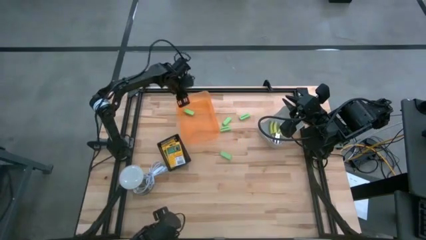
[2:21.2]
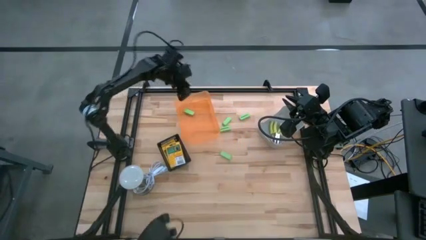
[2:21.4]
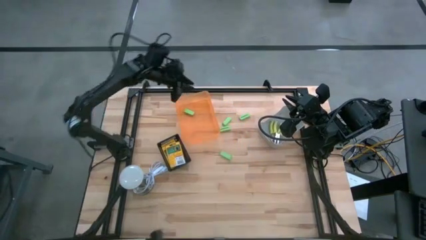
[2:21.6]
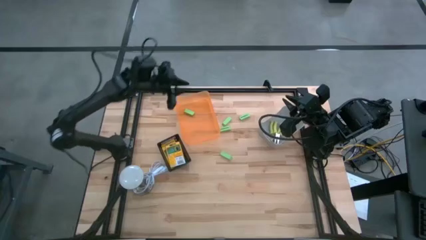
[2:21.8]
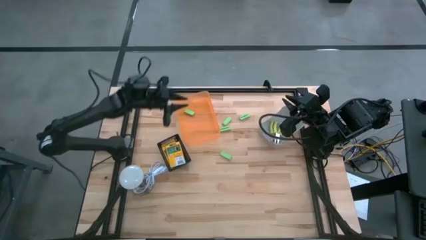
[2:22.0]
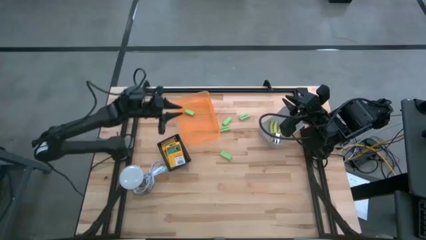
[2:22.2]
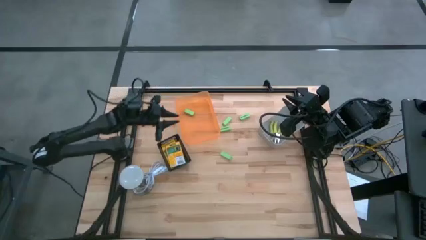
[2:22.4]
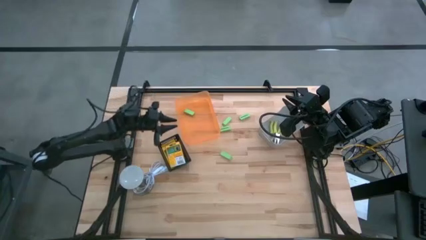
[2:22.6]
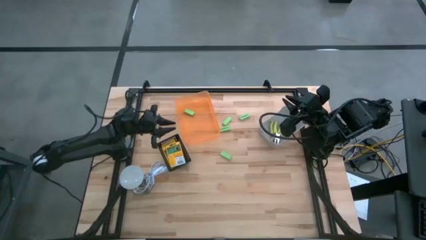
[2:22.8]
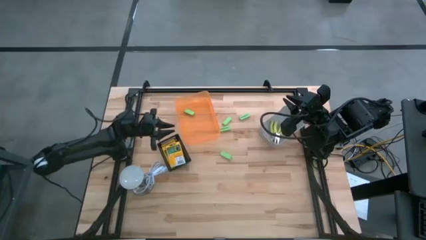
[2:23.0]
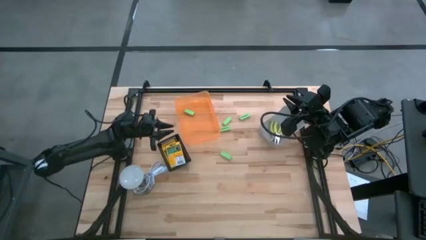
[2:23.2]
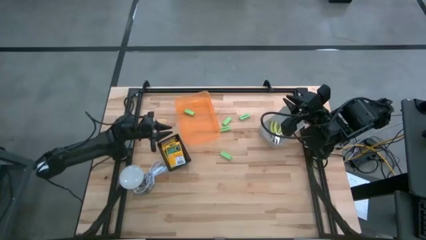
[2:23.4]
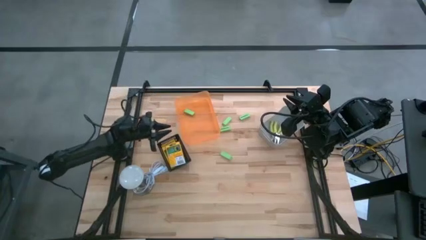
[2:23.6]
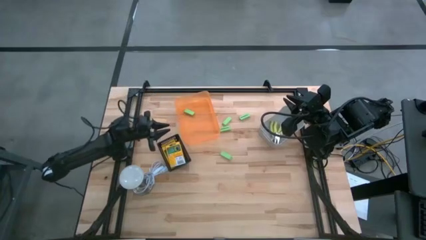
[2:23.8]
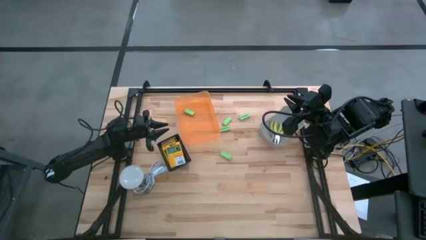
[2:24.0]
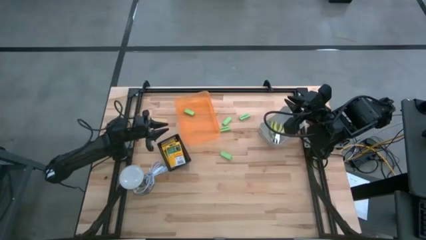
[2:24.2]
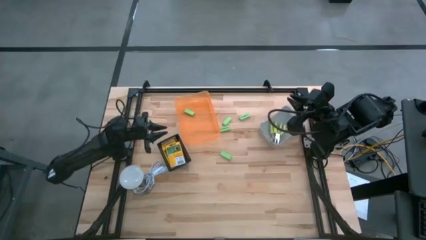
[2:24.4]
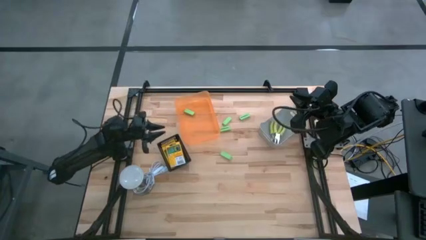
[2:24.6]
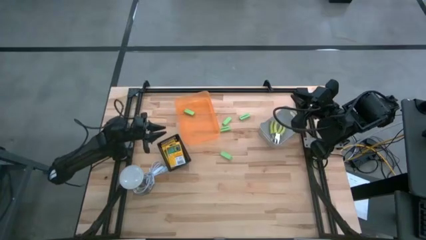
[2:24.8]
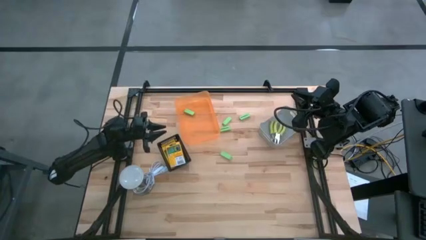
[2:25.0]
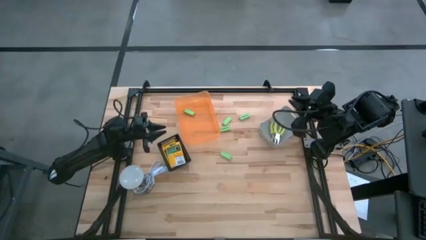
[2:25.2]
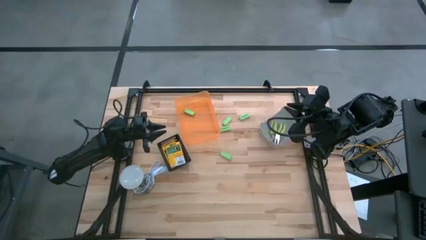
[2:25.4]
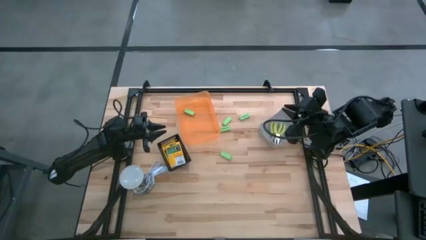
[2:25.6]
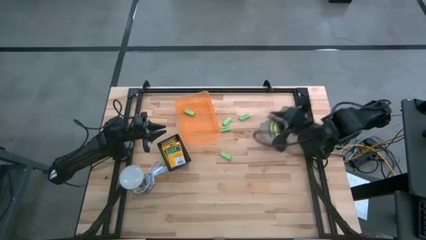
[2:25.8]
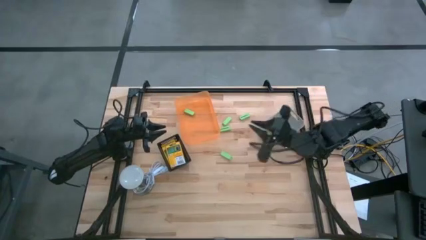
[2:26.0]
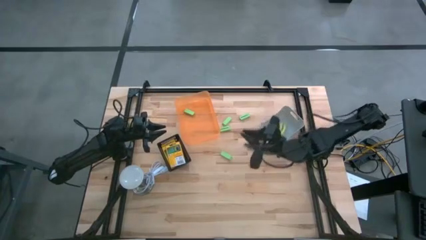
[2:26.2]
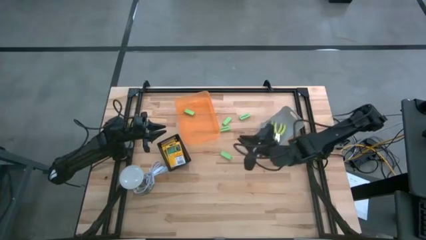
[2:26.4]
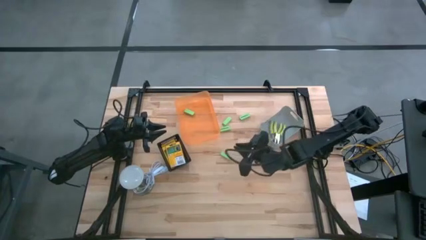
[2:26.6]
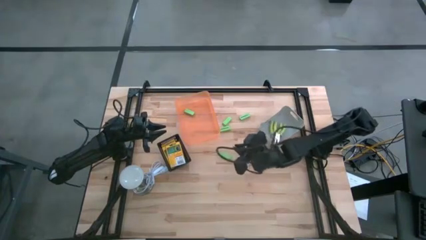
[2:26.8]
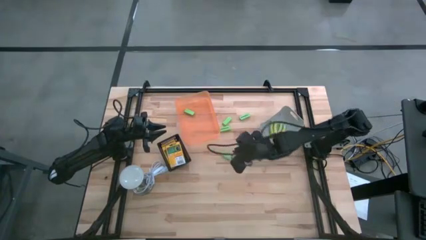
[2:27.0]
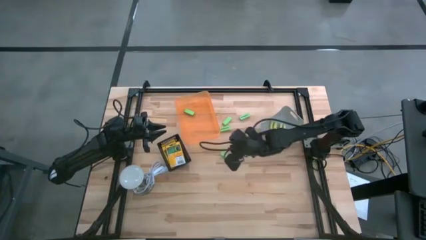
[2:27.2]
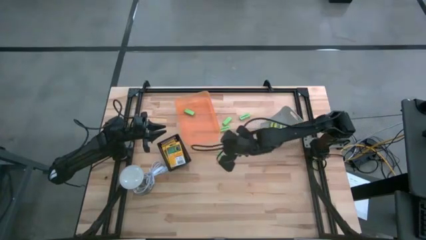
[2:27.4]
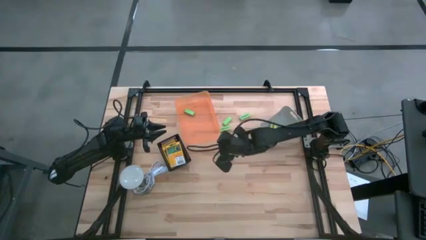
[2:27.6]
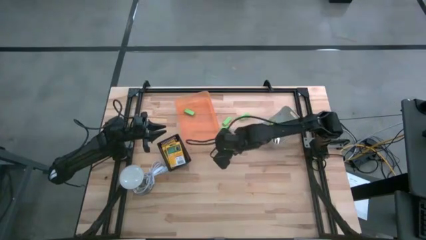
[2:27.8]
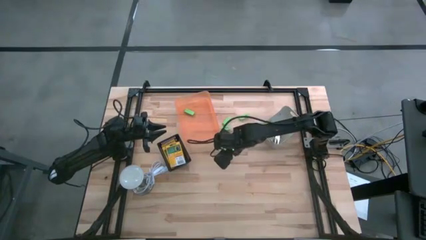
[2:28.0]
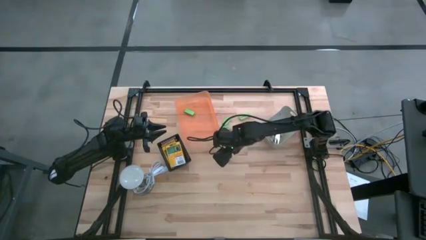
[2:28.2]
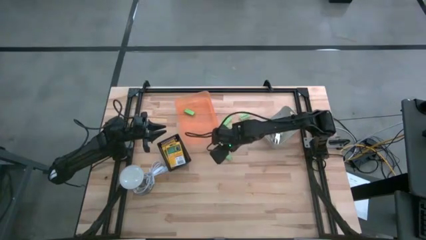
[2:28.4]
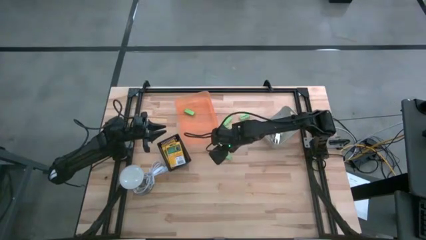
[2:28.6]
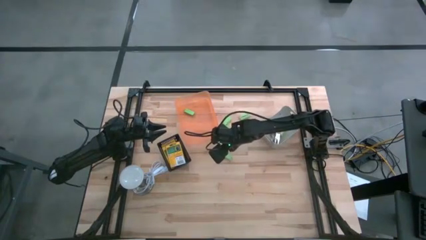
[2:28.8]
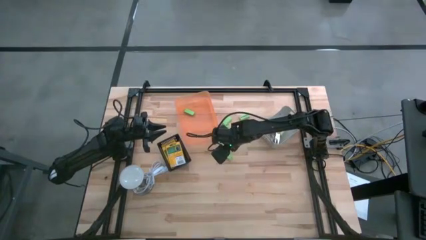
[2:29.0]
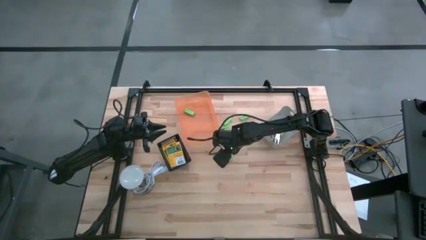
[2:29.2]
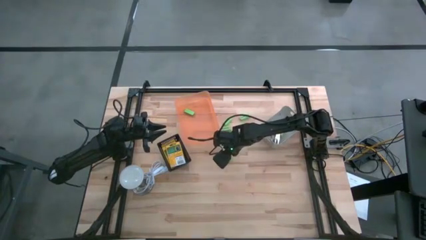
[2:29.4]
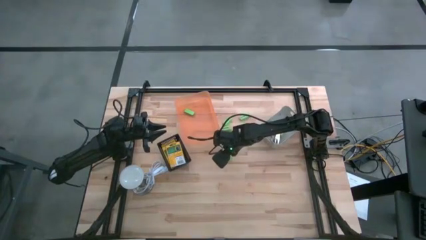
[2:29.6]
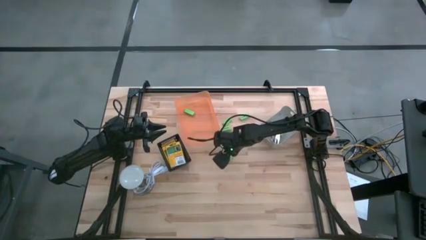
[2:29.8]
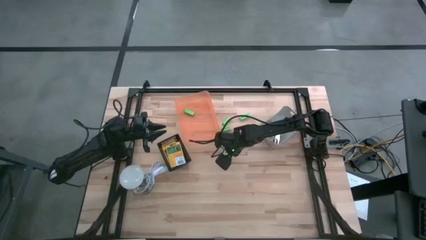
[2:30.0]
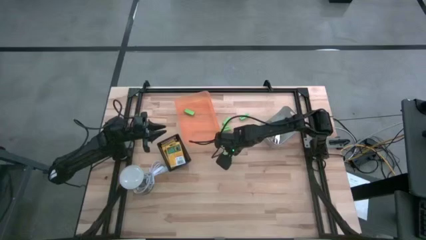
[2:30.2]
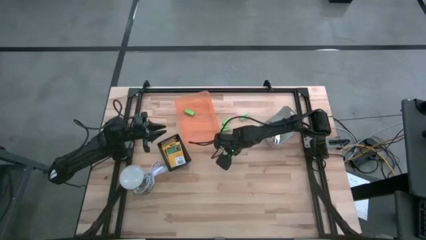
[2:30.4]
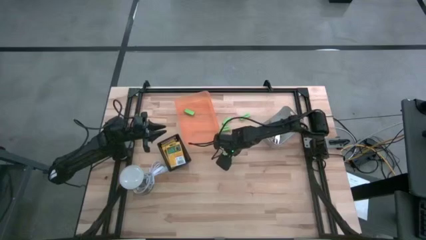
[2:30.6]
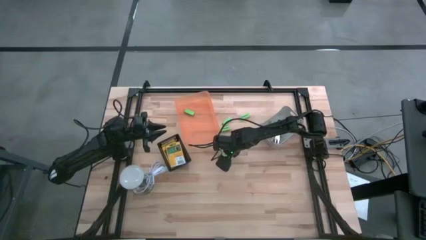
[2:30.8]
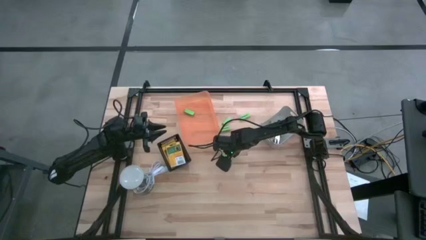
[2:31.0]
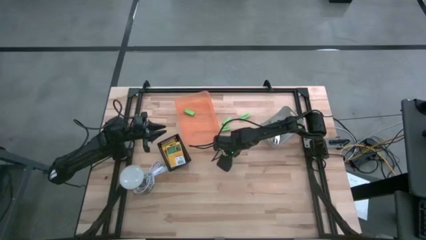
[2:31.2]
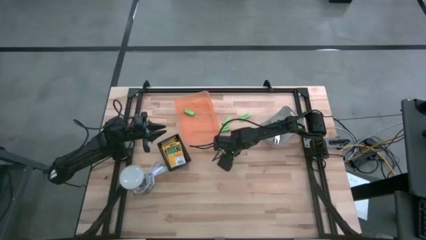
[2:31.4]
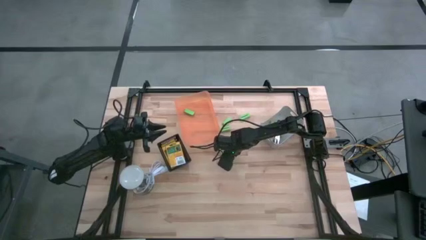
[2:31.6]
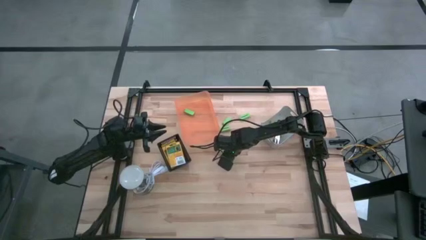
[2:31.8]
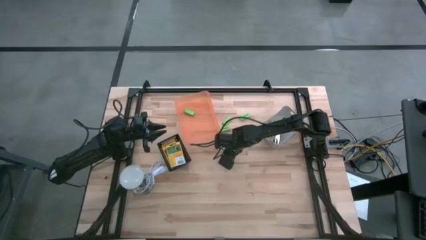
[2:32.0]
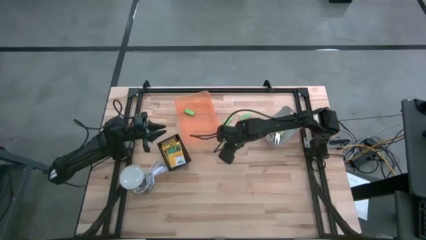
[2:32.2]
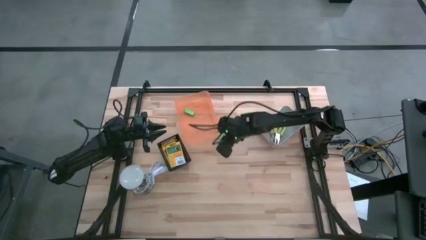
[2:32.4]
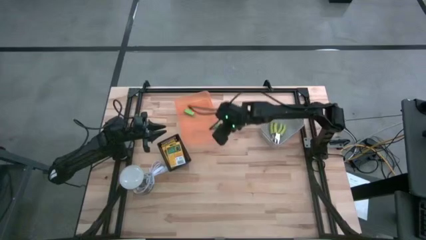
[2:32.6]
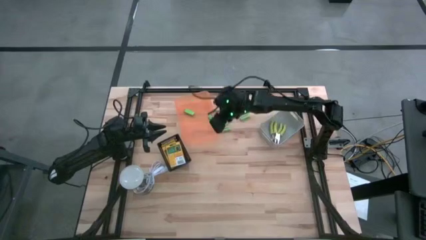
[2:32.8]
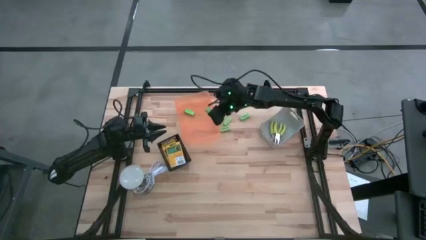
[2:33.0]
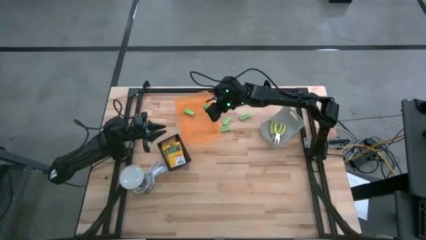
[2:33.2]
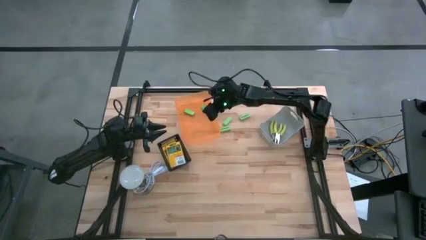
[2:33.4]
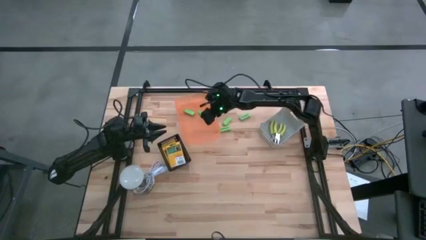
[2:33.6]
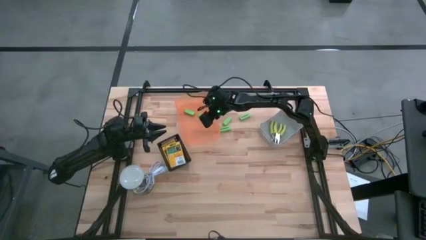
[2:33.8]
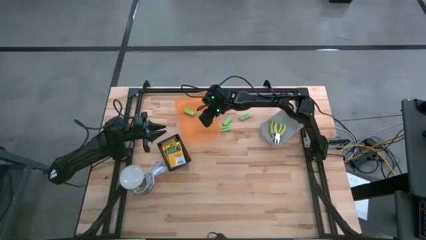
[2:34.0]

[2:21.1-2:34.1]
Task: Pick & Place School Supplies
Put the green eraser into the orange bin

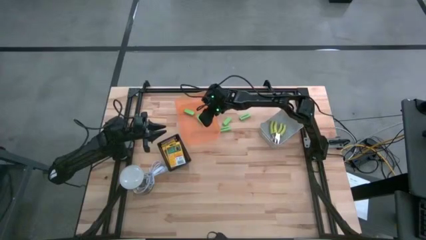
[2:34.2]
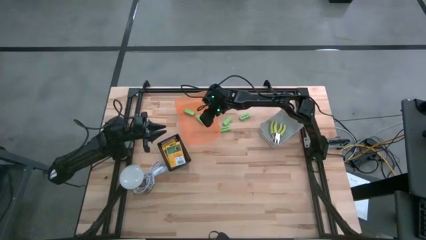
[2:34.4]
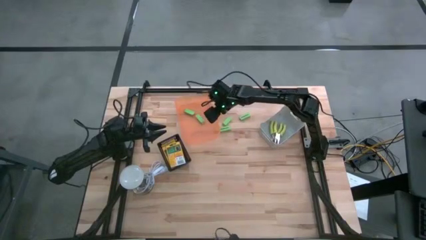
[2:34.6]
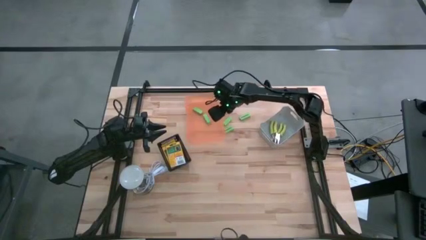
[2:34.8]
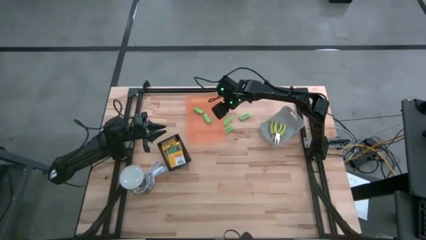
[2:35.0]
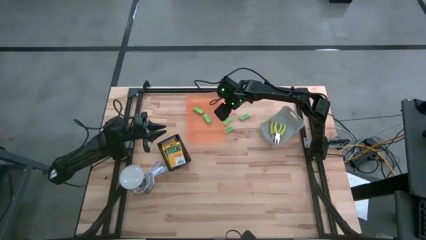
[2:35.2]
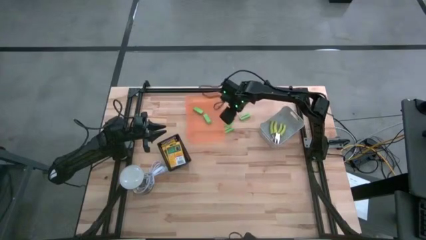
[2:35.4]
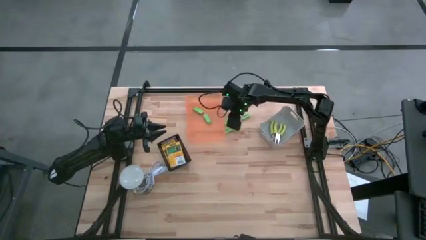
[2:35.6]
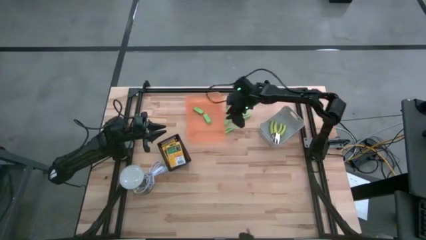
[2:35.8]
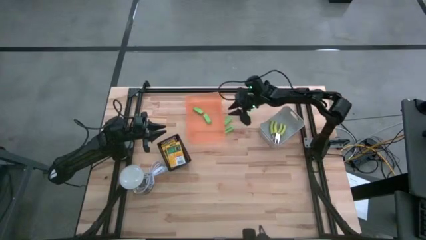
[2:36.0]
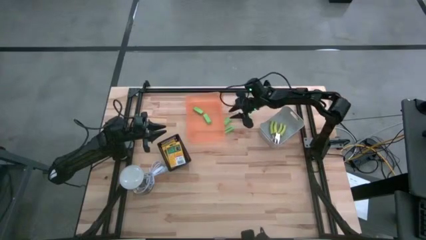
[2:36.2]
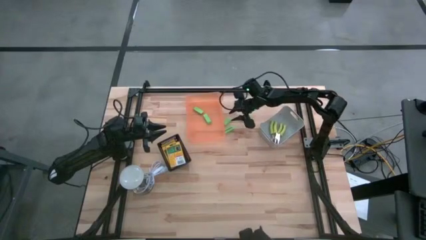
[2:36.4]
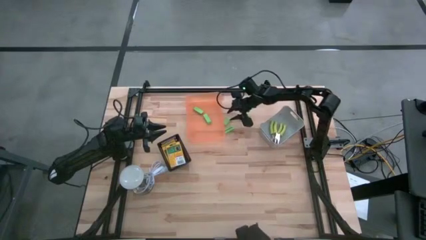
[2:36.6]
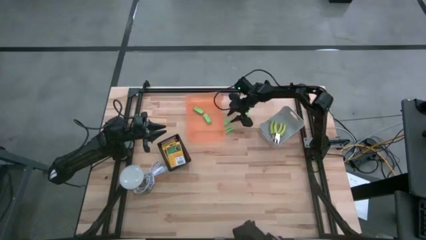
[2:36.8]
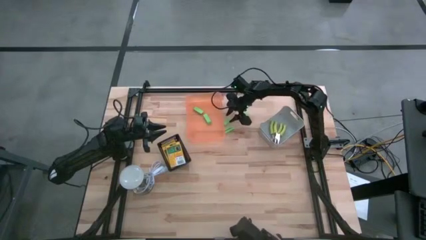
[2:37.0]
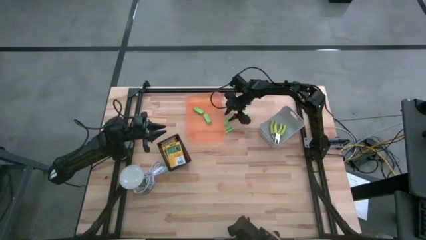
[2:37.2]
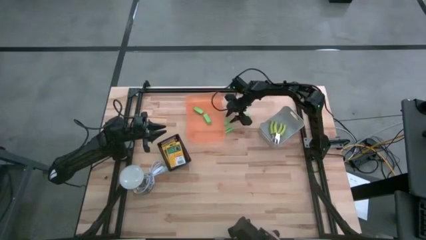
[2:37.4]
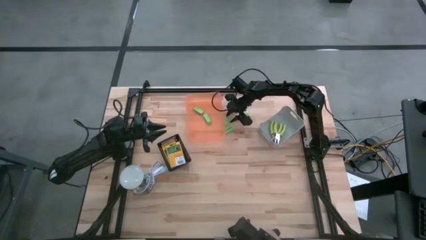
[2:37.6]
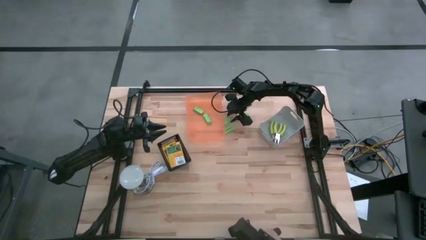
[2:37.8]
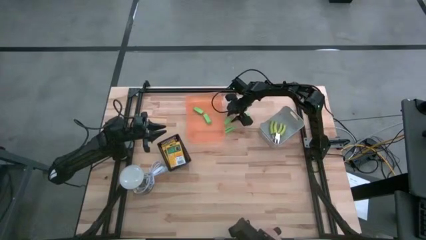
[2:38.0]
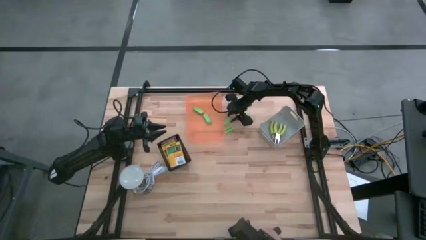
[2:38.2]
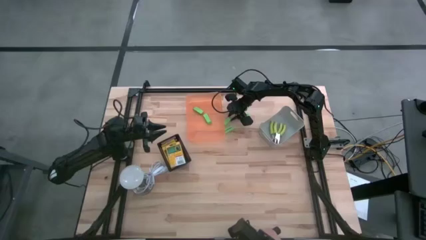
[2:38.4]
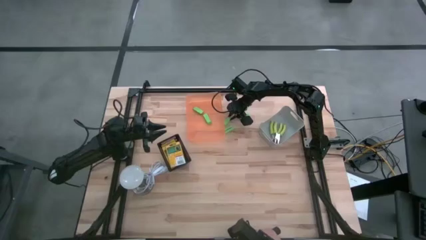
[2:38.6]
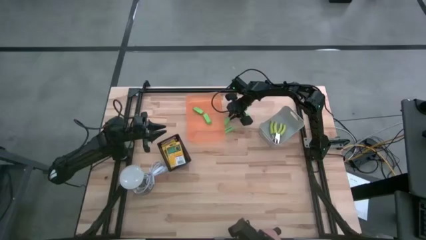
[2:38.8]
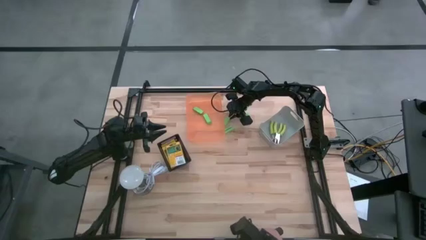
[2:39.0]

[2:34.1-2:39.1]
Put the top left green eraser into the orange bin
